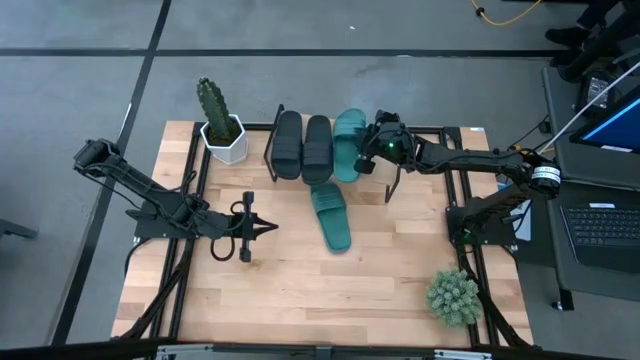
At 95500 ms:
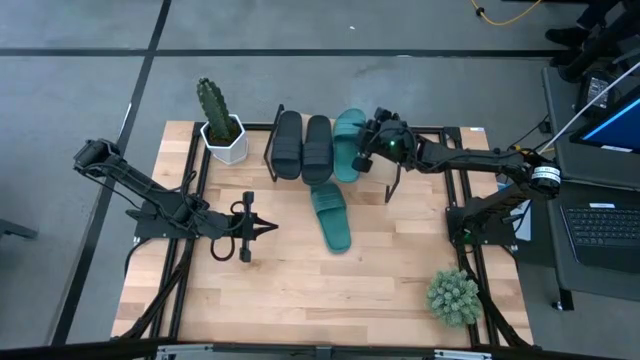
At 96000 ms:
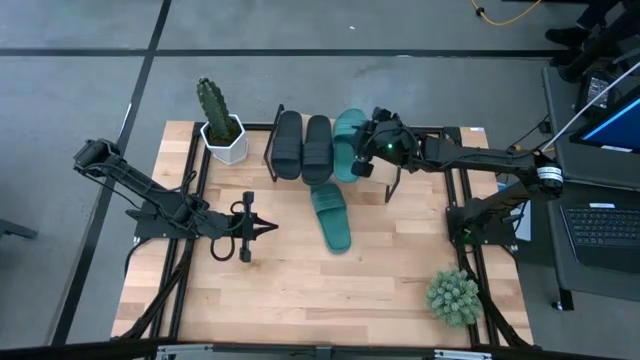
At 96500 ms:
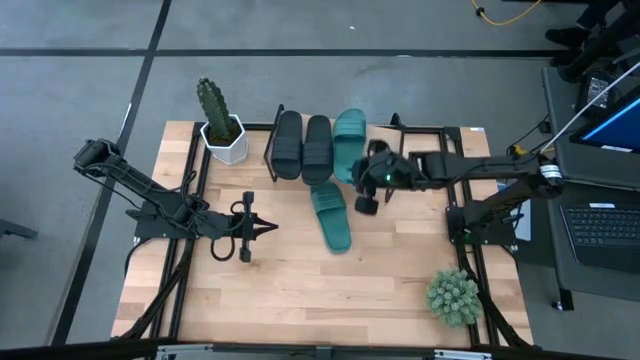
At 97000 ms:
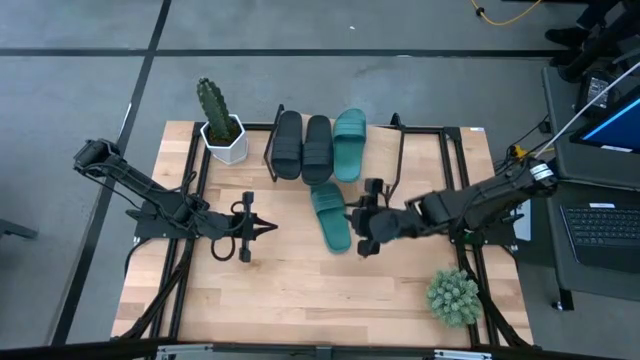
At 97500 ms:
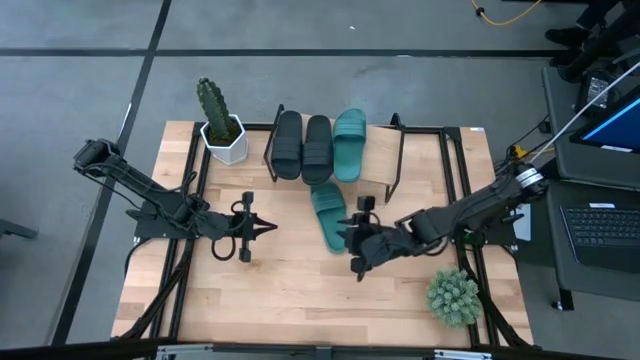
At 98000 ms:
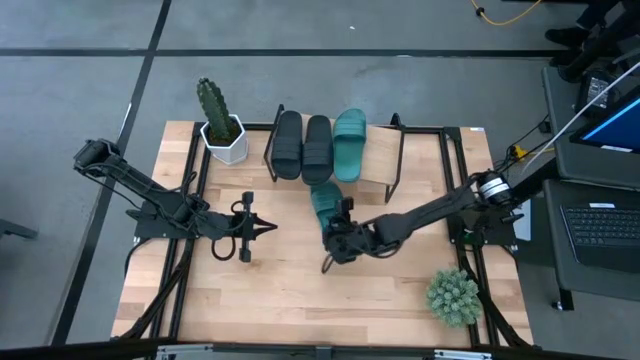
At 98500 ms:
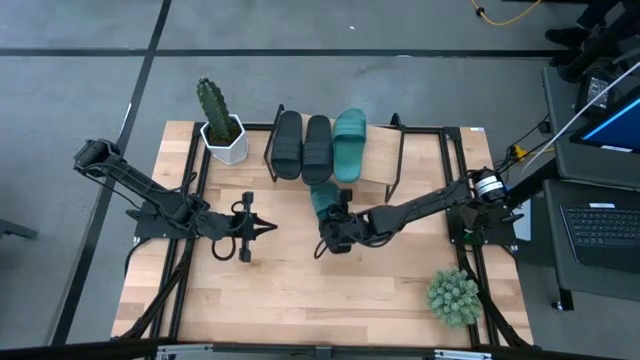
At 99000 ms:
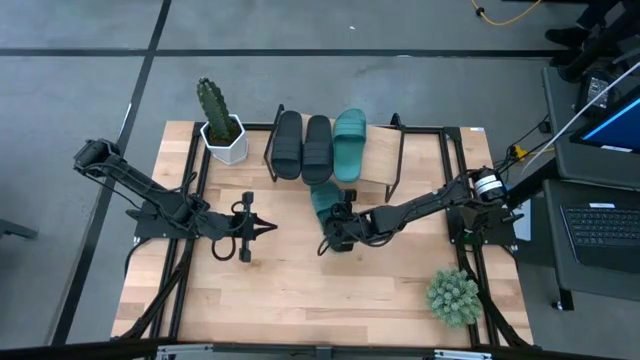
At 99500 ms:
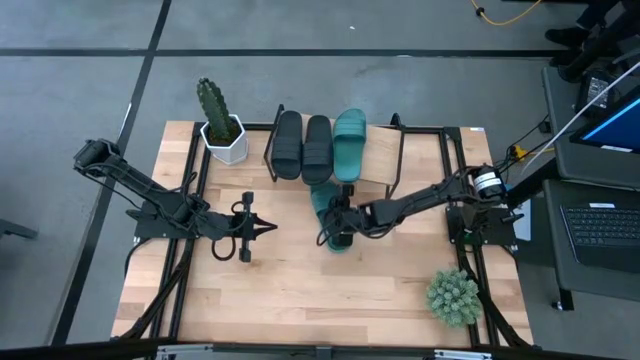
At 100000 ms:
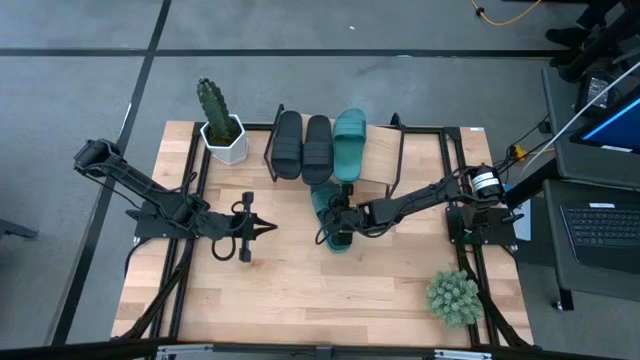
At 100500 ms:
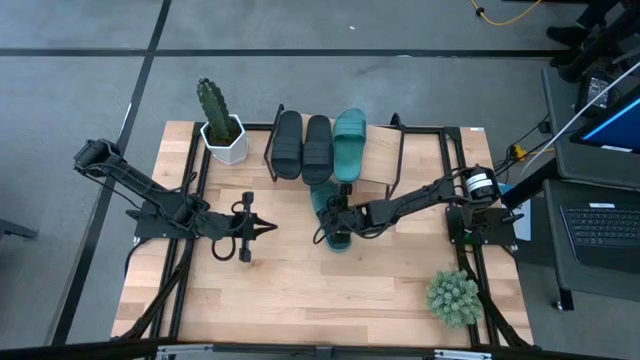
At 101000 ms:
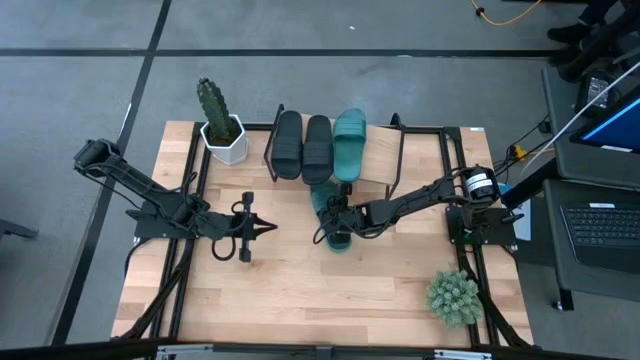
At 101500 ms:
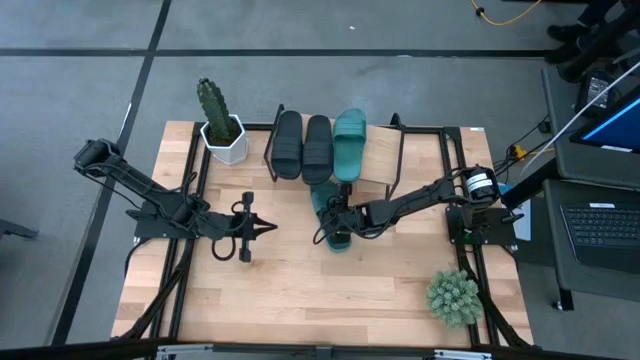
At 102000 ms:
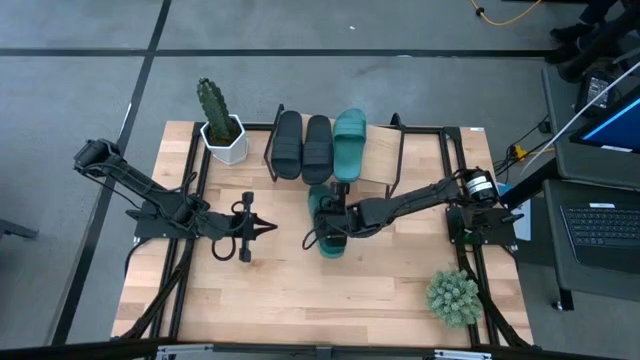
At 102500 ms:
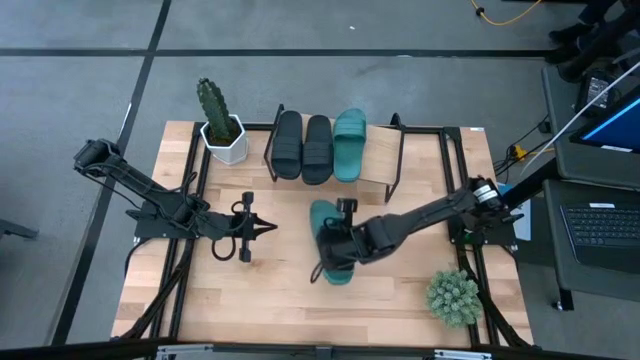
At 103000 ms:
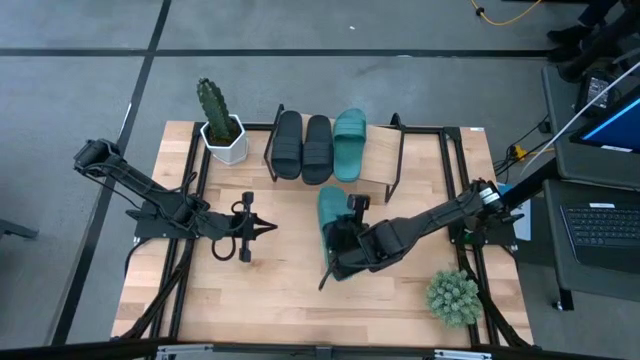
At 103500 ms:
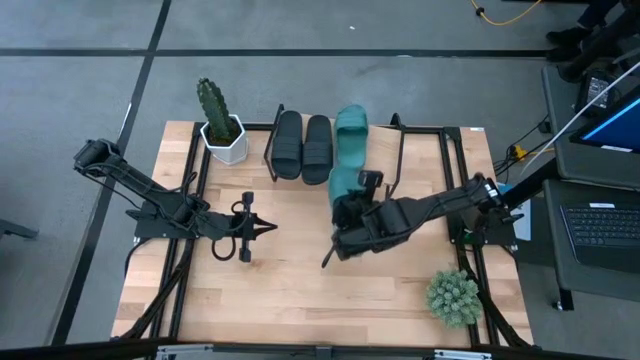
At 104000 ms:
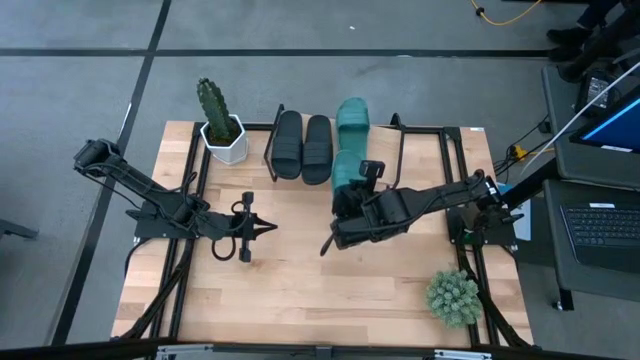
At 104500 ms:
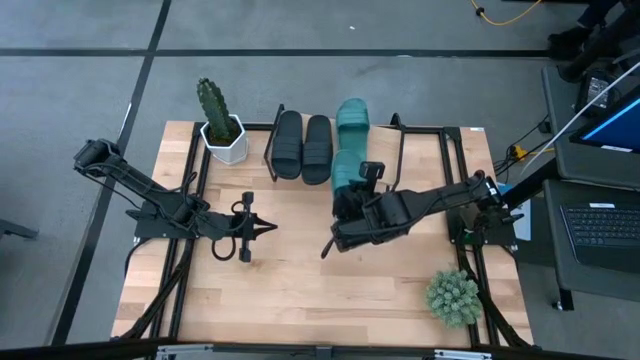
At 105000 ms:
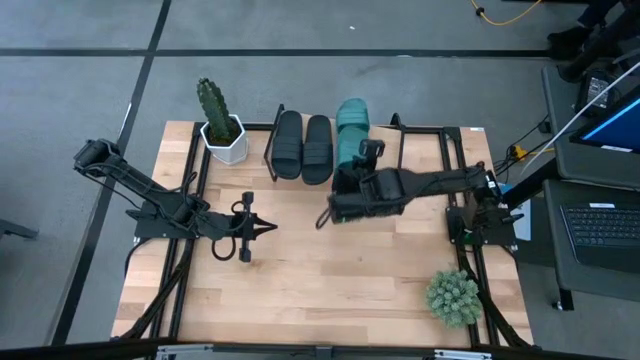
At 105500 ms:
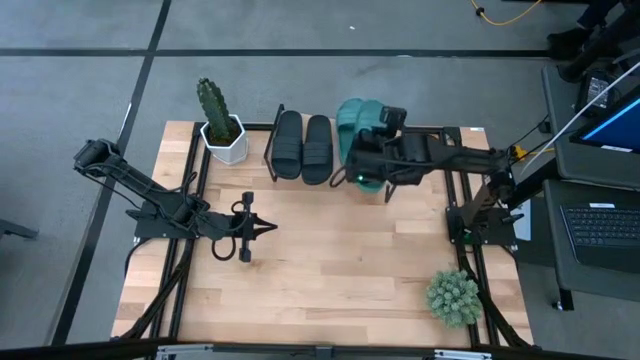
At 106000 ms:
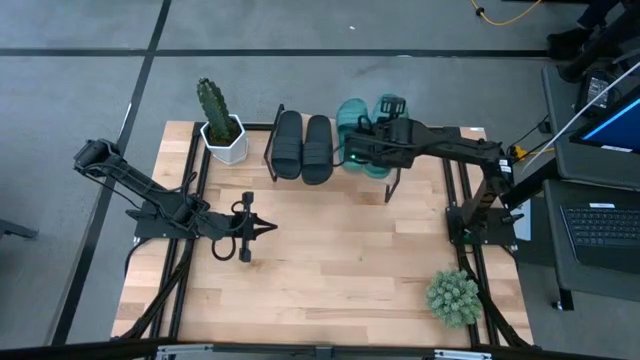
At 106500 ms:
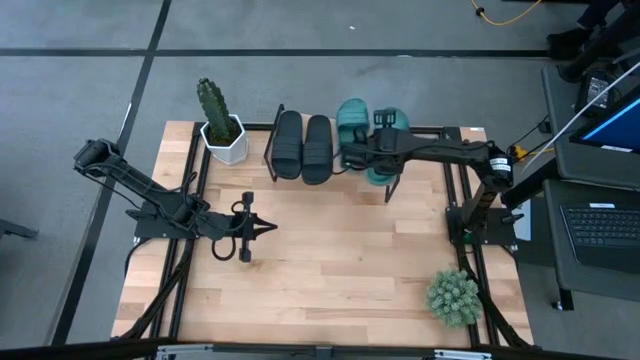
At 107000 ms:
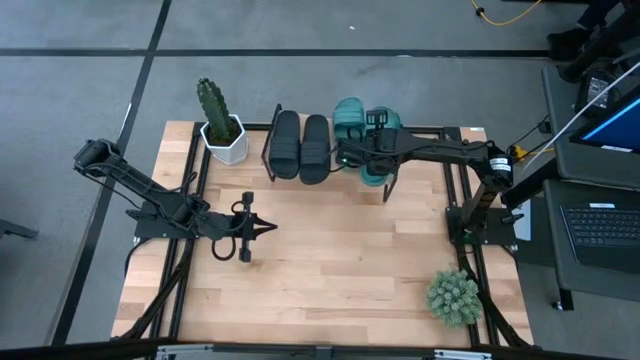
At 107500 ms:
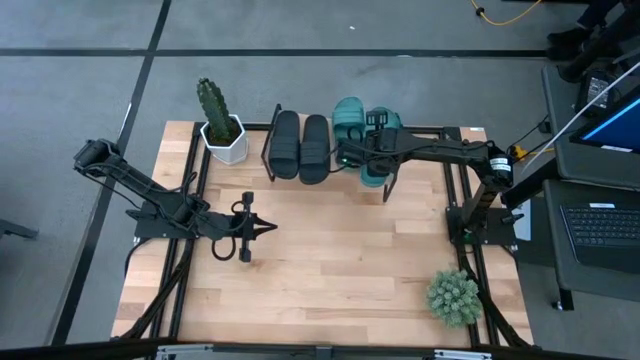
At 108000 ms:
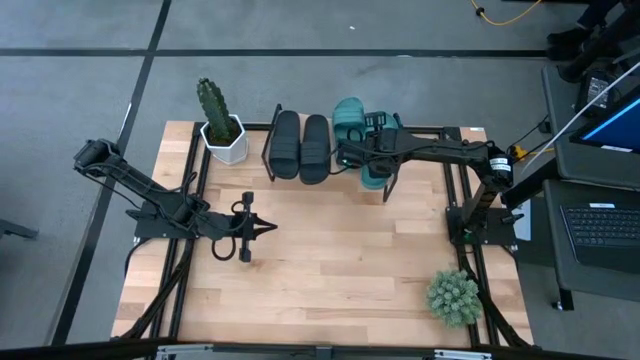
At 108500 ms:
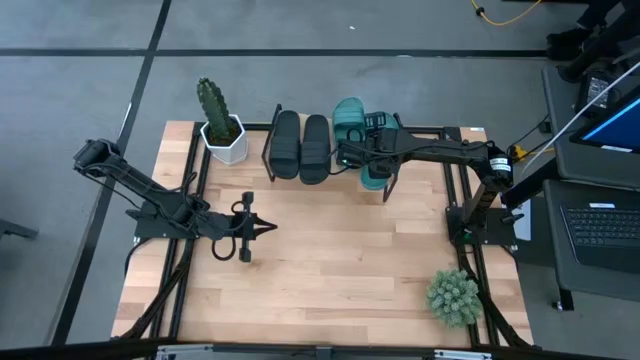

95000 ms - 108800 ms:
Task: Pick and place slides into the shelf
Put the green slide on the shelf

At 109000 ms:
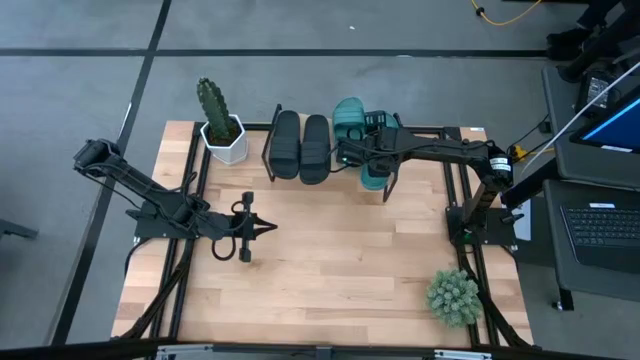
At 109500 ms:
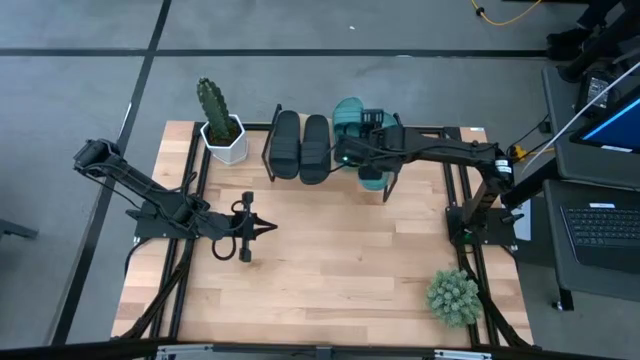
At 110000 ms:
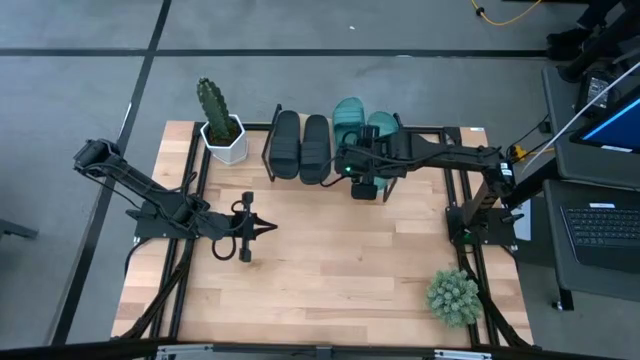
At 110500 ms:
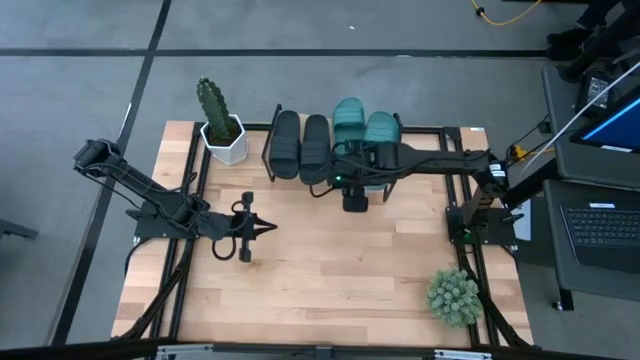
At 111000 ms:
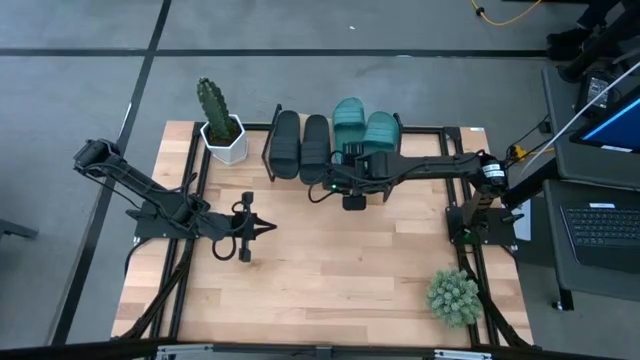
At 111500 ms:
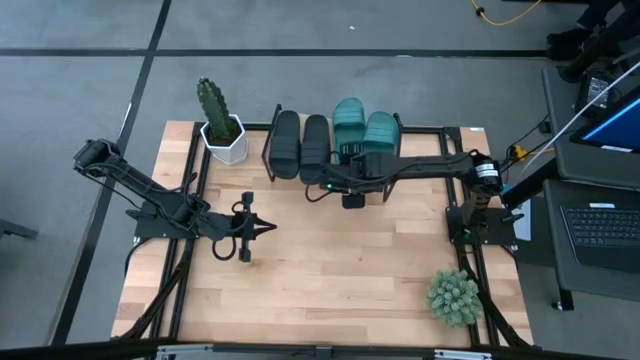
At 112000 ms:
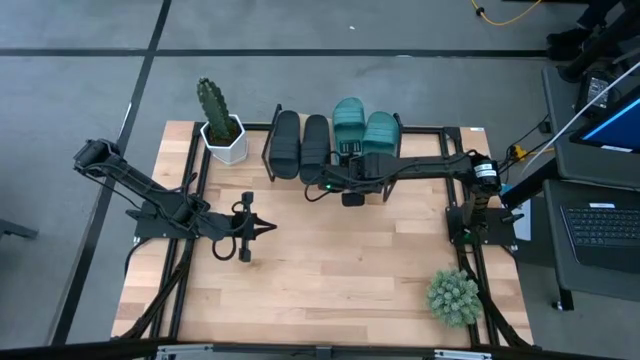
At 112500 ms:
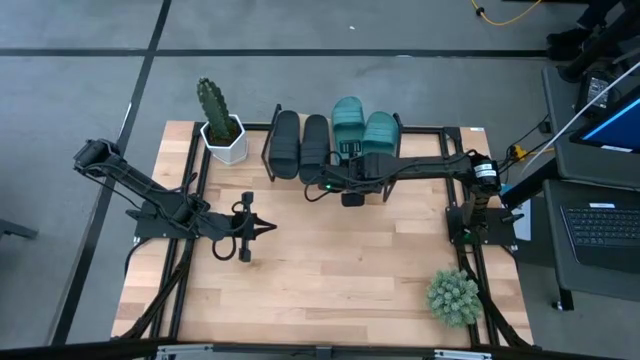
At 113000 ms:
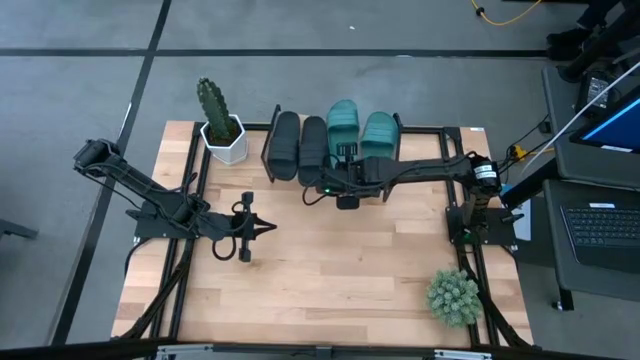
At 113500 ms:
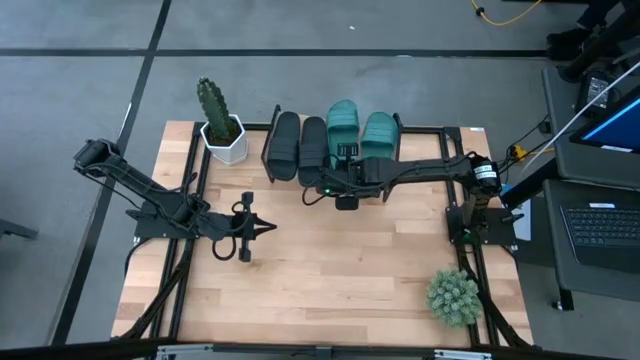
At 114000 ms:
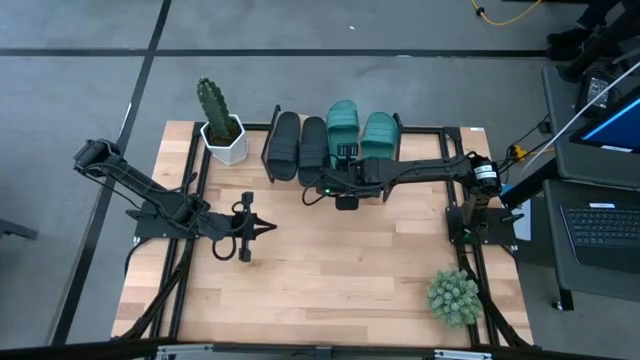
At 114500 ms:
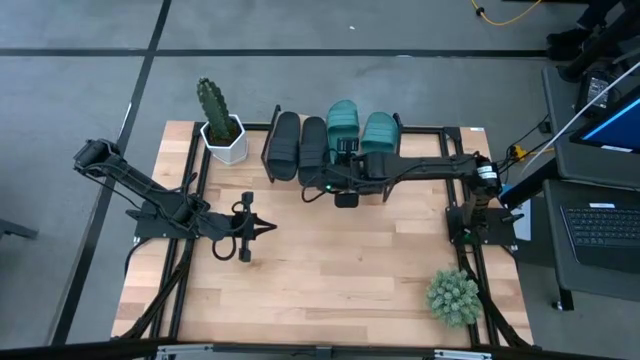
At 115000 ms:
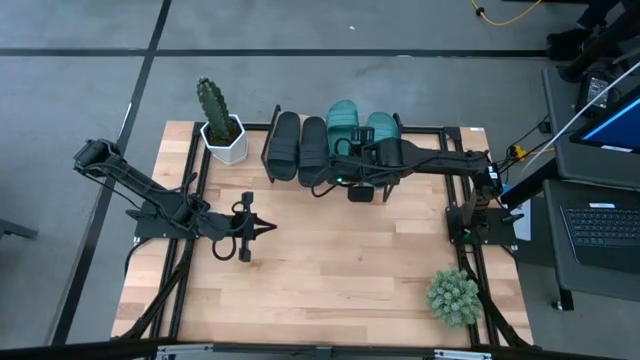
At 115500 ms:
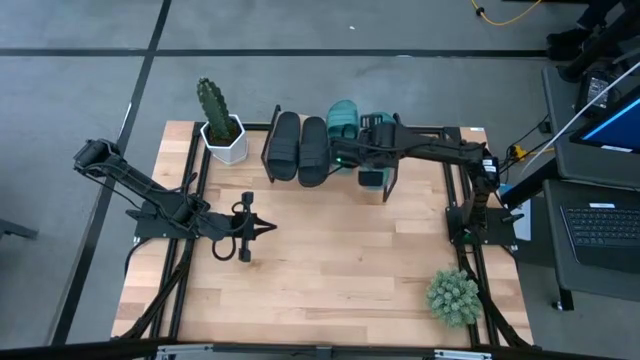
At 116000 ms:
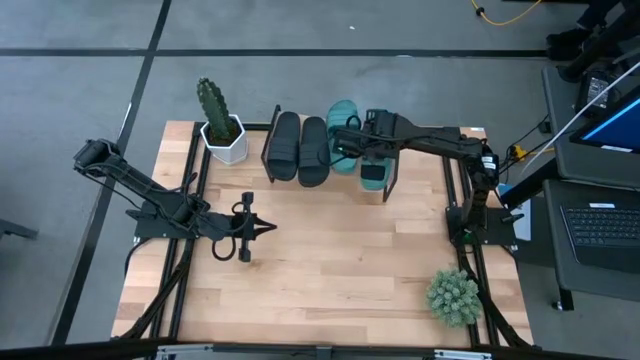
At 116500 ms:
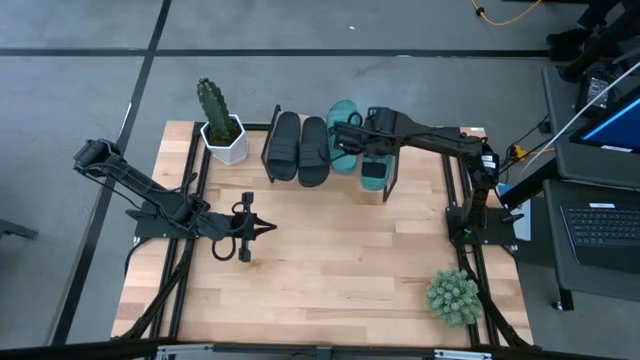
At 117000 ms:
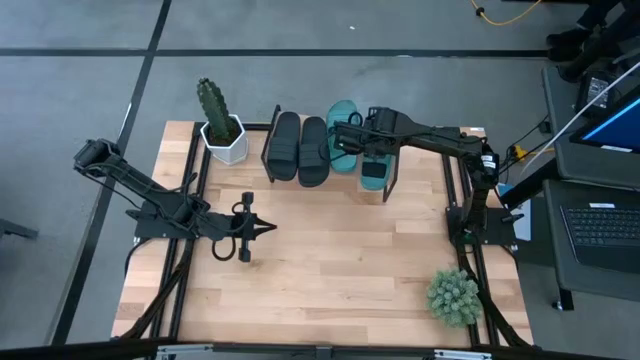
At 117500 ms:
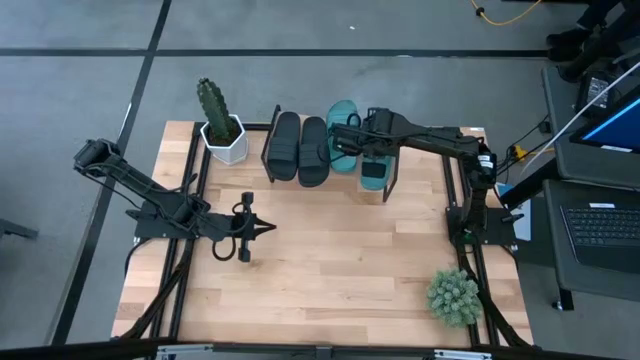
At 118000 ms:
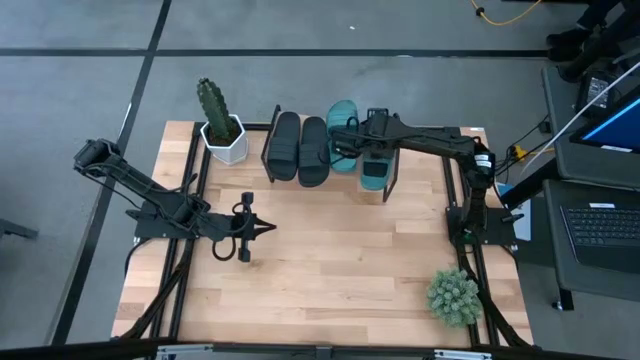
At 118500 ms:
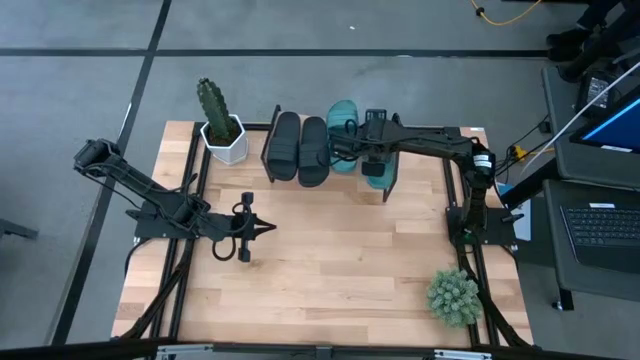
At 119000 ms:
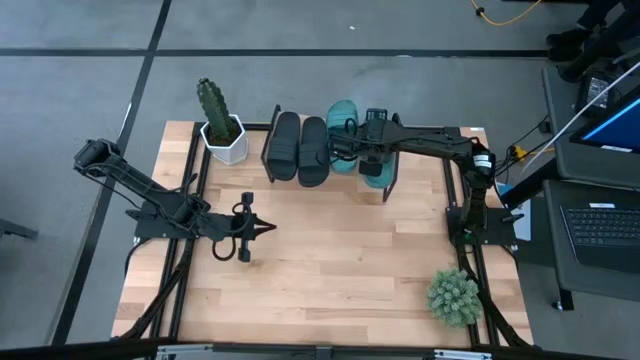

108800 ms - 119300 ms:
Adjust the green slides on the shelf
